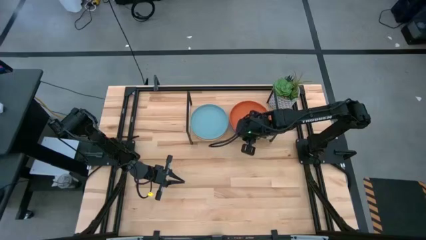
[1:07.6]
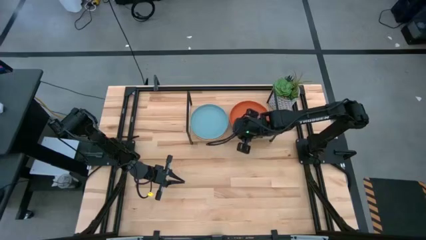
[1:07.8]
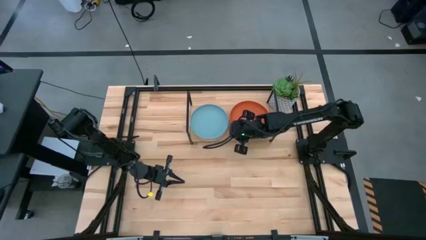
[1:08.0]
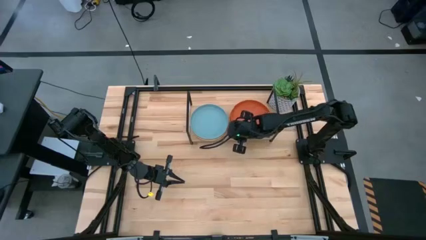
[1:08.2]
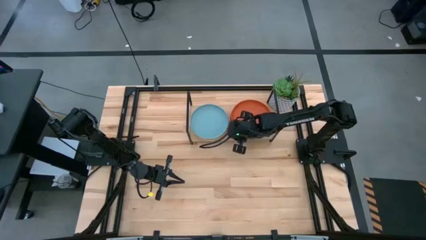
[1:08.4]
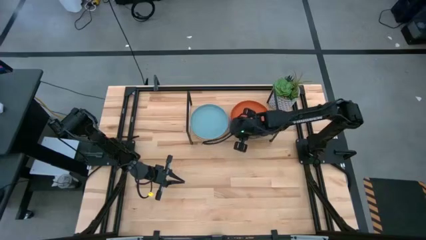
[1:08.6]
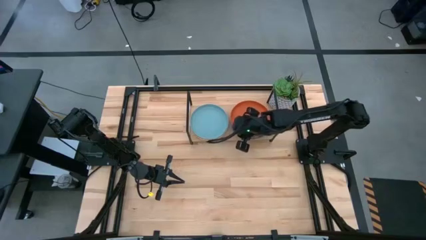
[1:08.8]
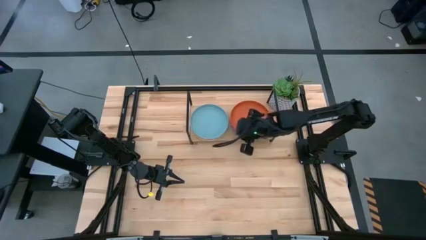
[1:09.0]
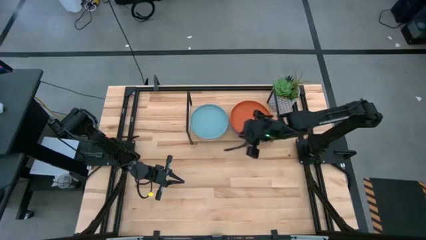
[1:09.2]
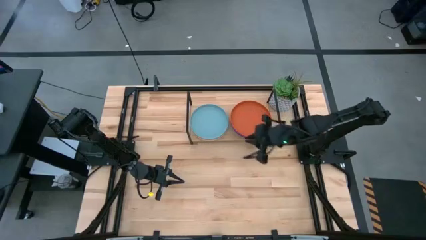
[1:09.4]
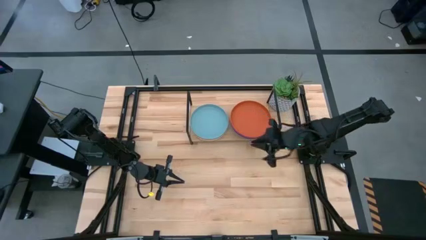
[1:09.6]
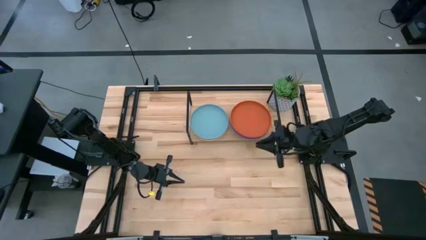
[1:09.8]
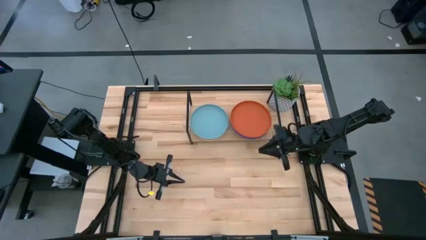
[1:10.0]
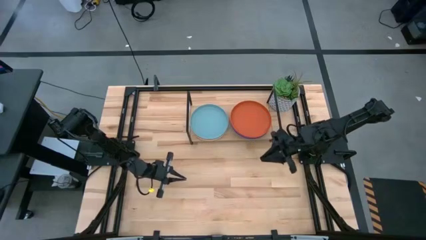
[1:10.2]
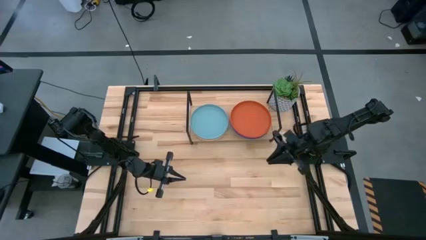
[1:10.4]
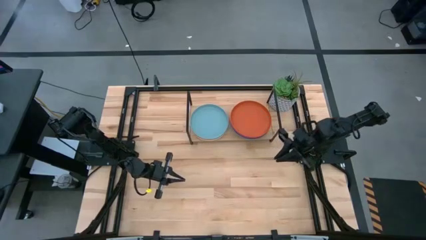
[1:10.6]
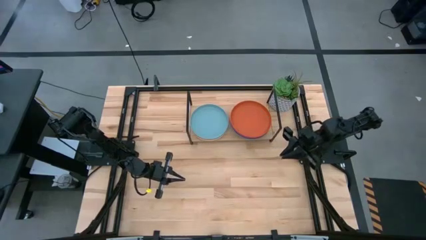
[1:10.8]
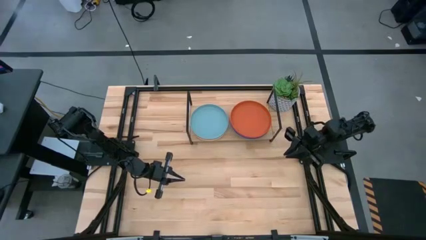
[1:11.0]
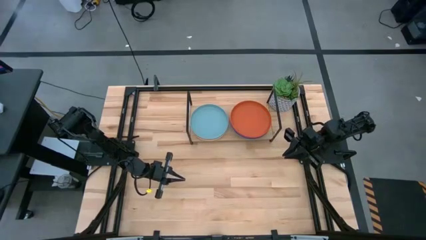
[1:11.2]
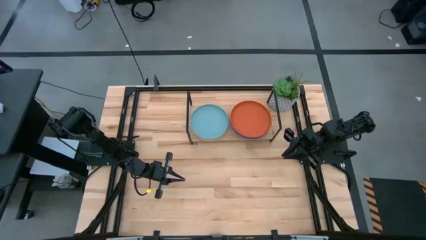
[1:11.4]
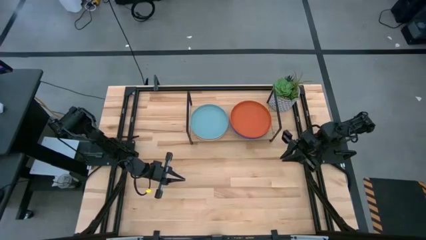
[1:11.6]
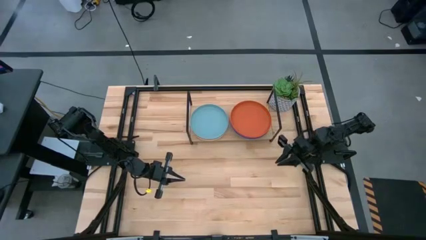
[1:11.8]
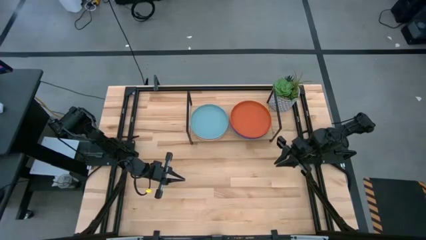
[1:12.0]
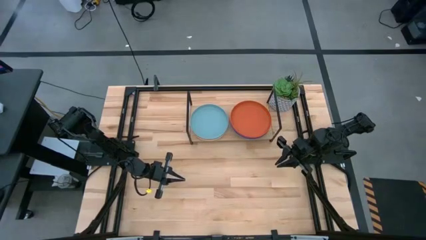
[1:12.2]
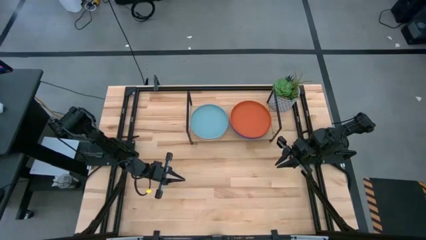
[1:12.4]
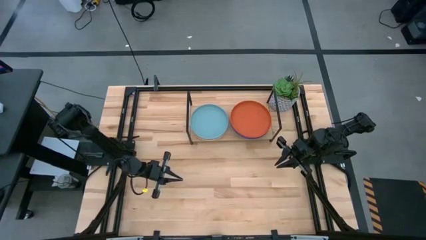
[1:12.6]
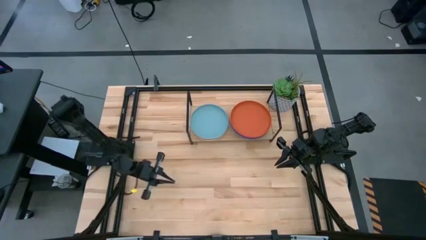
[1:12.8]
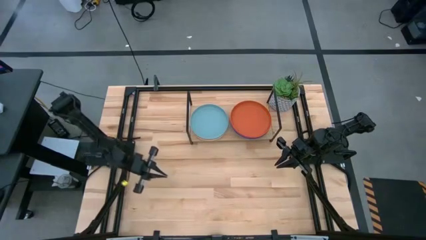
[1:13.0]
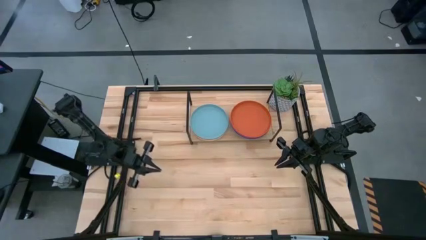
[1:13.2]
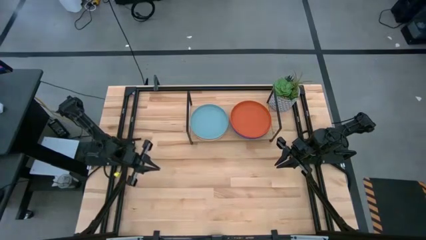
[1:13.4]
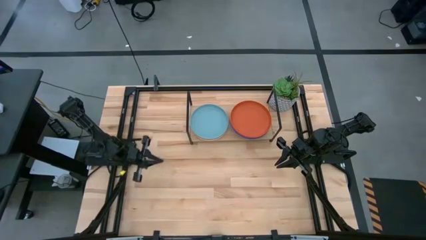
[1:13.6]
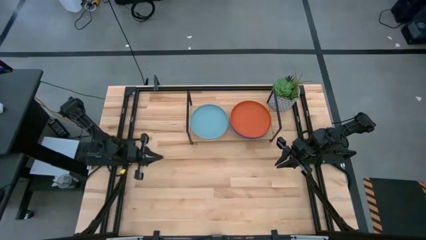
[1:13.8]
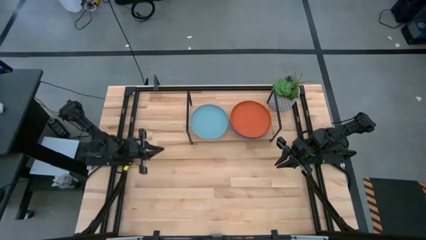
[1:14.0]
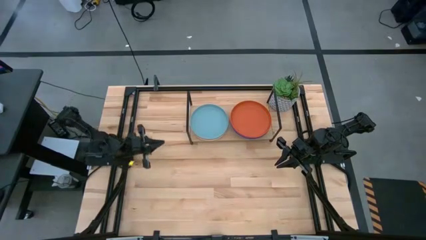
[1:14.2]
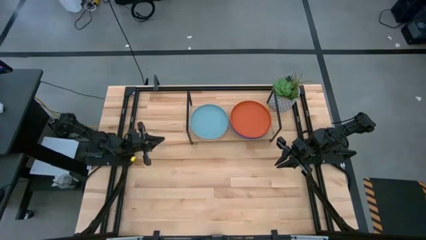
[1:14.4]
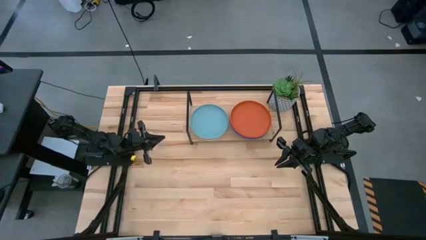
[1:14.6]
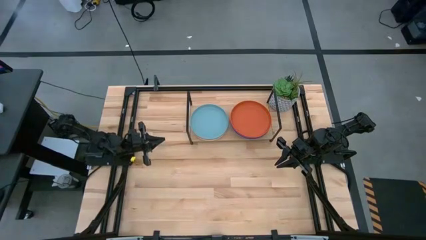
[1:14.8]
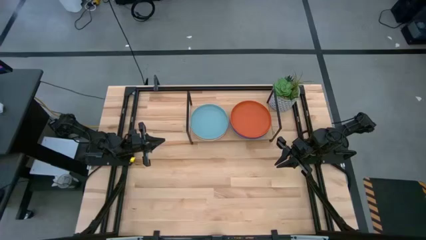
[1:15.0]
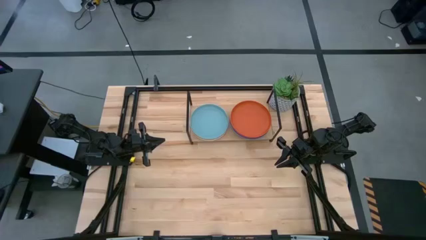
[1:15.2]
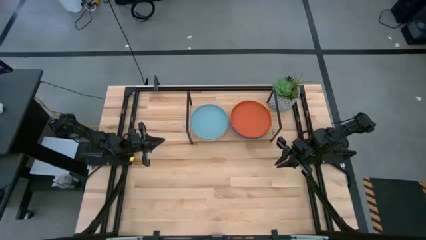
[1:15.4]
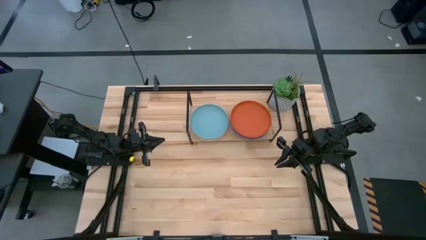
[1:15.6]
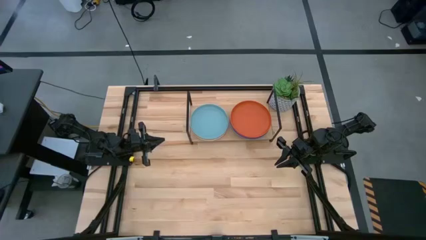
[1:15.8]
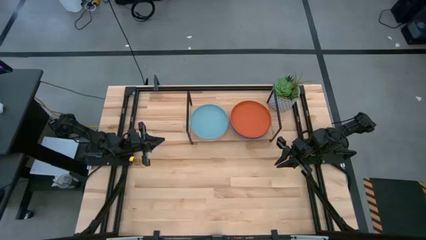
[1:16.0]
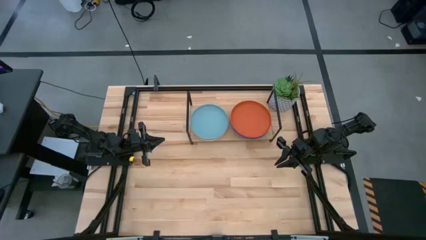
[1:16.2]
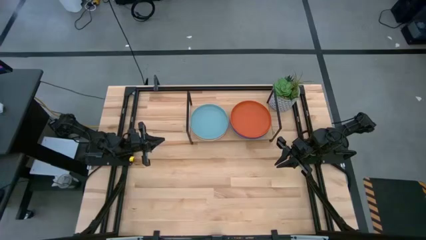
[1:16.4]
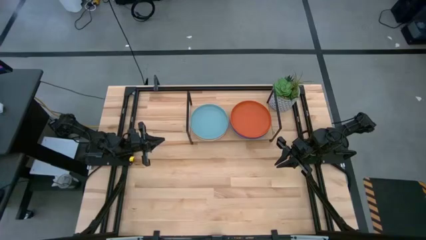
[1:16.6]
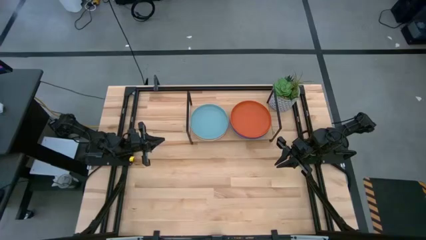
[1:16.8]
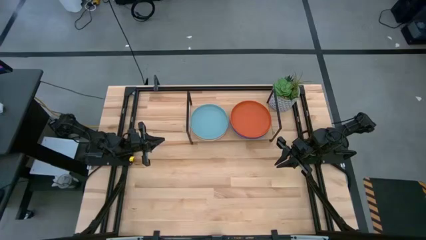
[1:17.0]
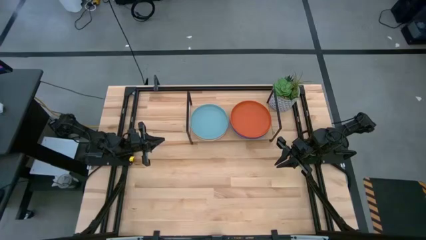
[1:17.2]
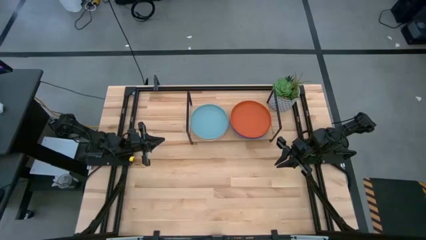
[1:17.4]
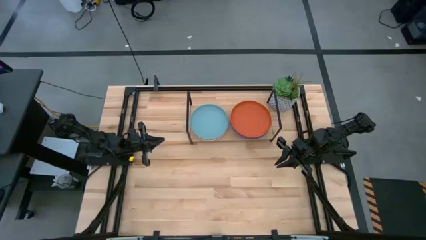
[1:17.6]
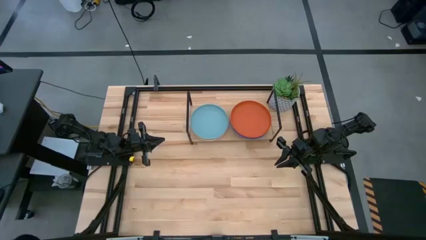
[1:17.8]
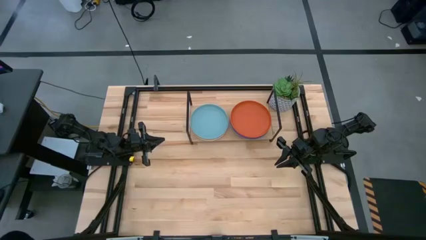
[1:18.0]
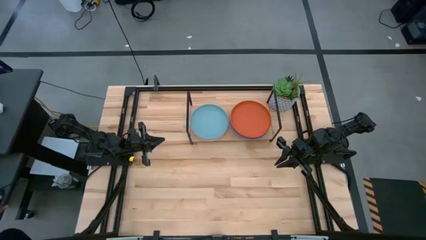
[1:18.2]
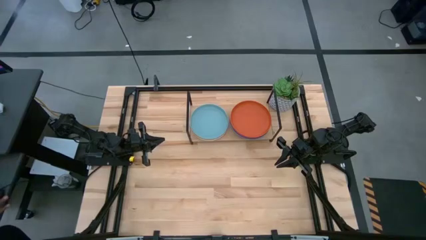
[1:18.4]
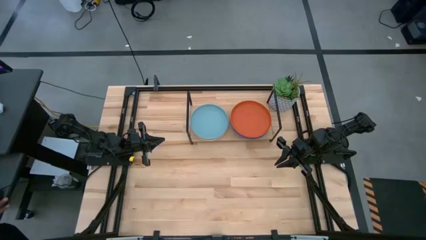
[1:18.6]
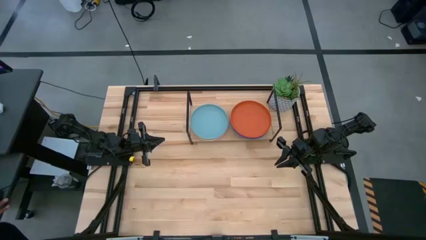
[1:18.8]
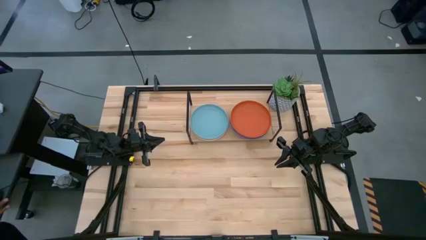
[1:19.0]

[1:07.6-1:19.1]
Task: Place and stack plates onto a shelf
Return to Home Position
